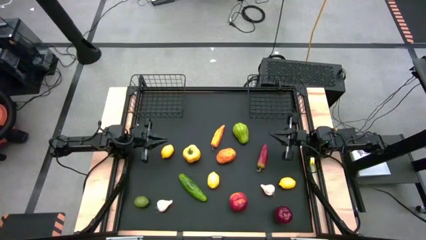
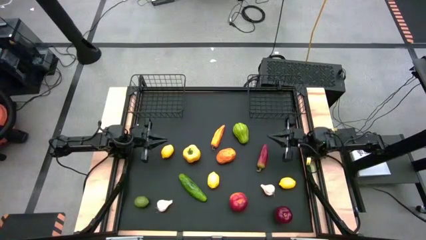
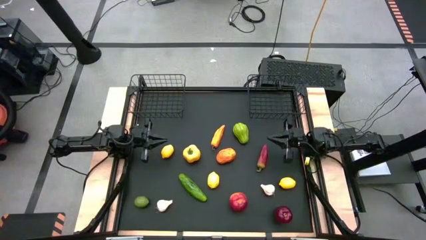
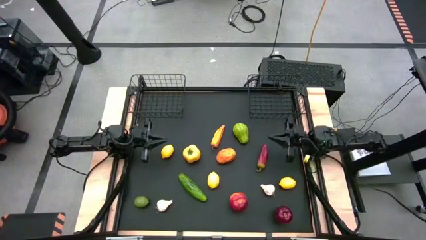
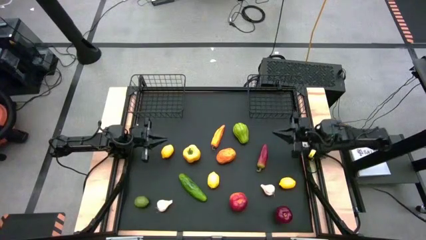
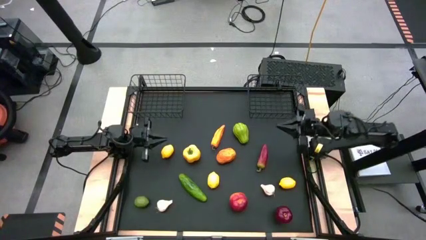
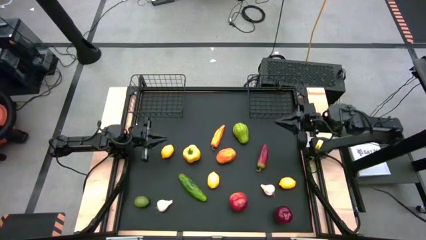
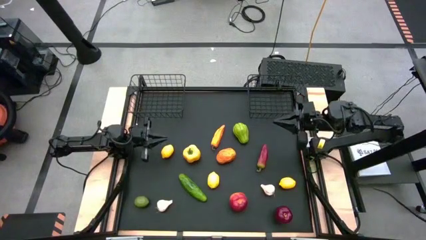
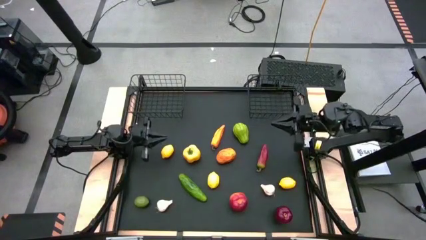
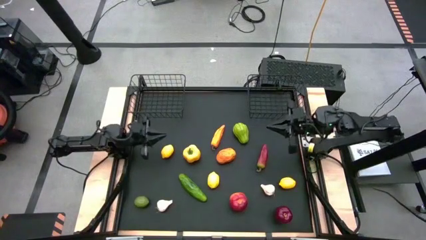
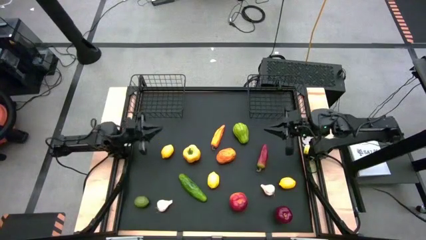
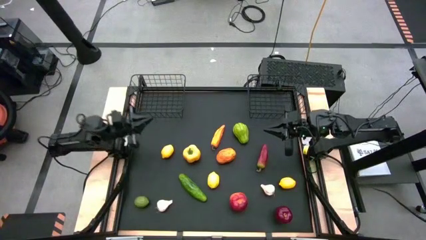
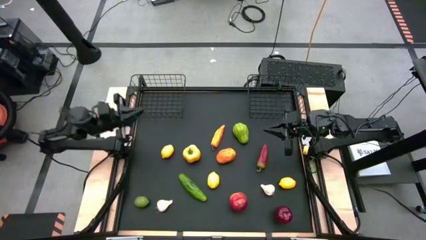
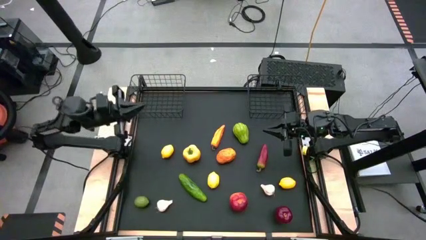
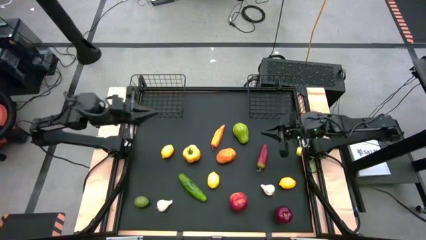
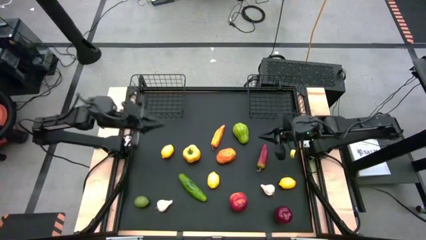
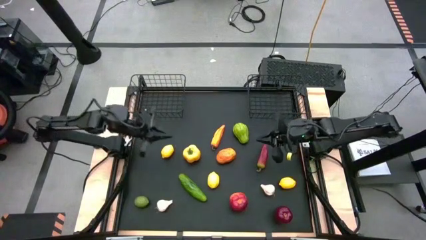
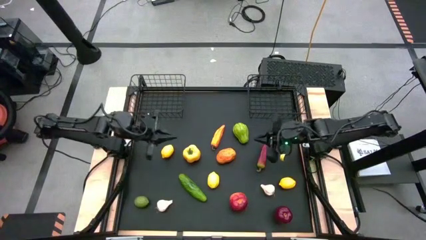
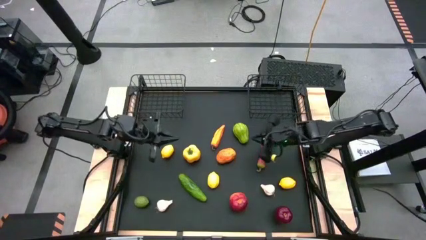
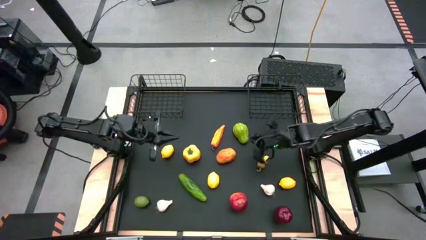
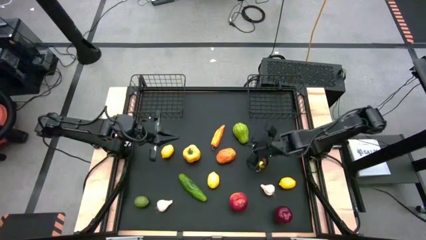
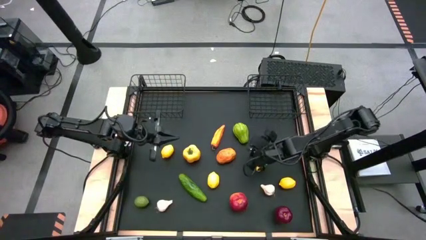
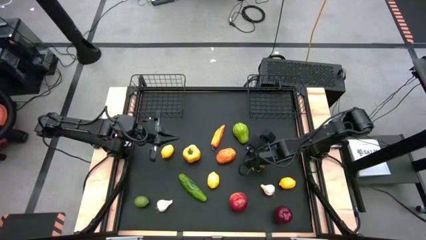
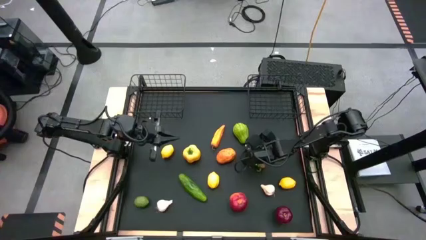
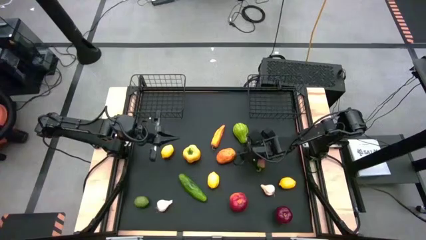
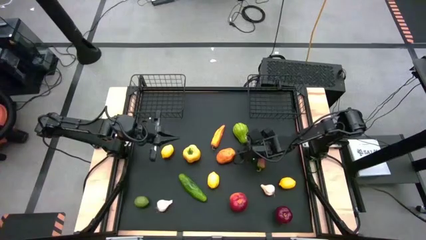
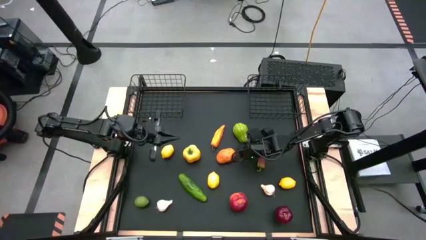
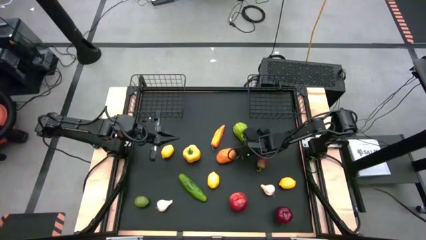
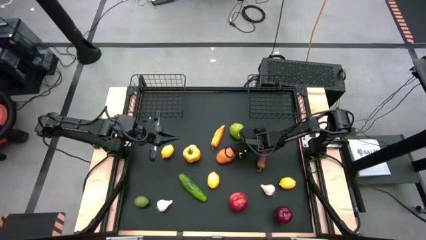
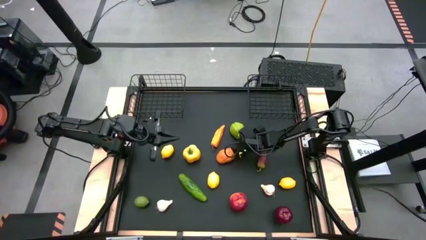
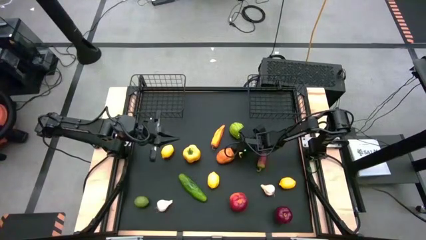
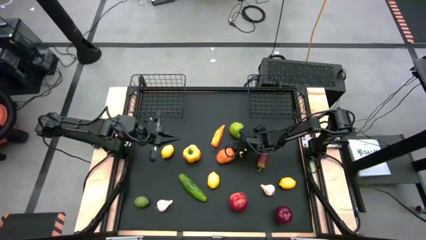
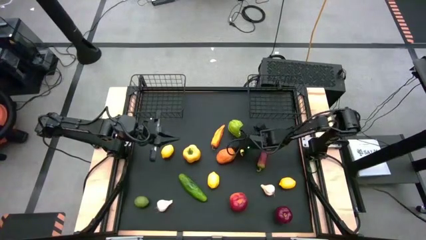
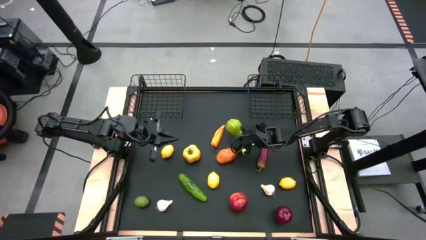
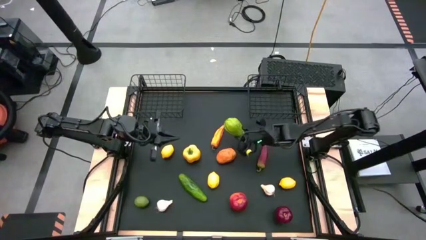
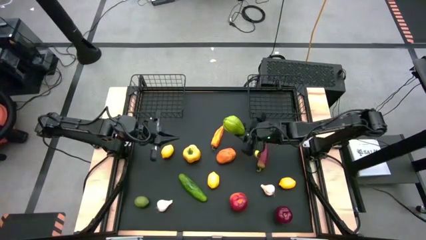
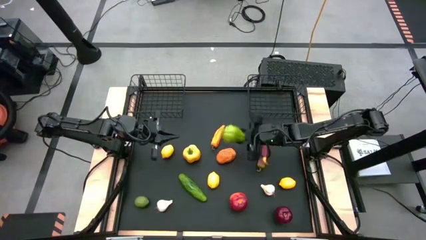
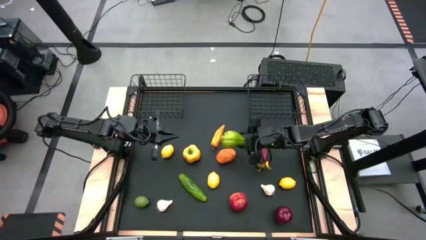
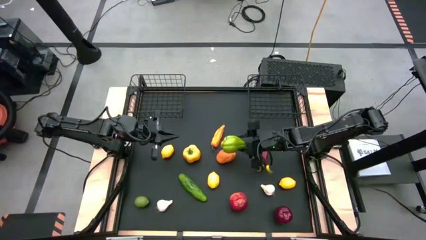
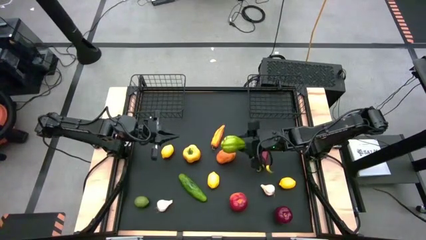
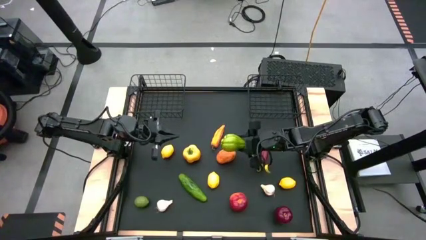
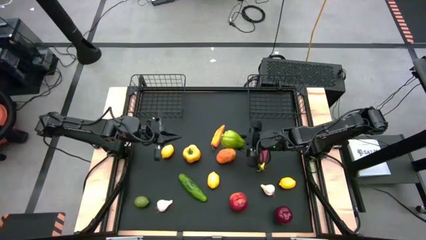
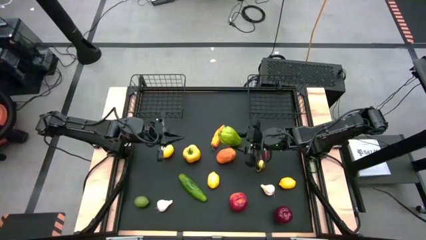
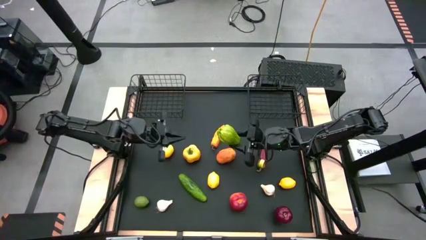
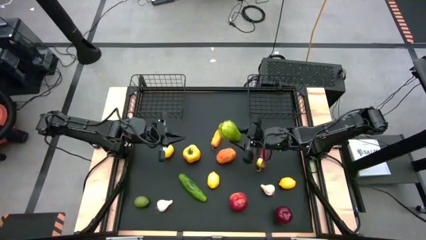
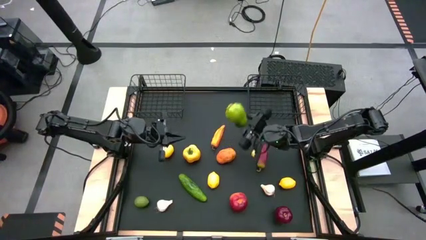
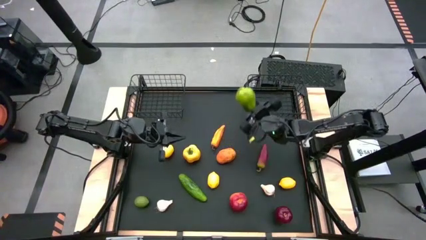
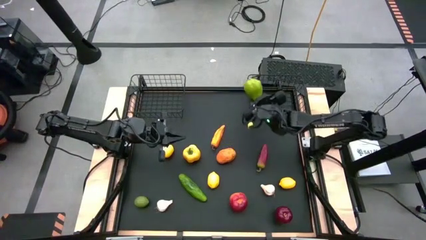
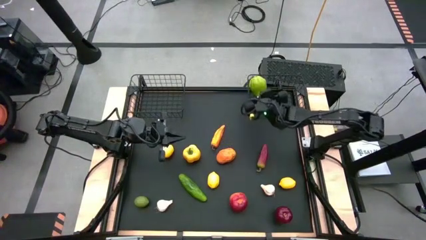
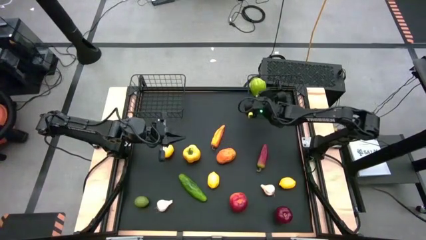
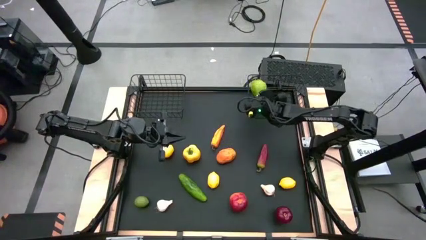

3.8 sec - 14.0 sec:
Task: Sort produce into baskets
Put the green chayote into the right black wire basket

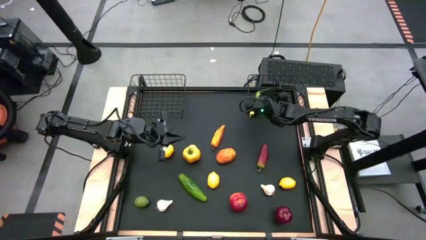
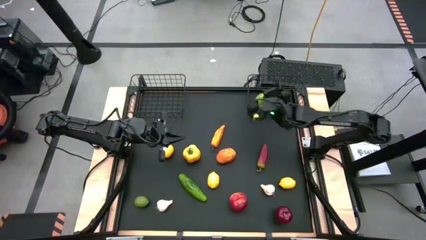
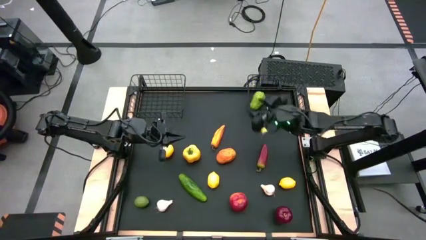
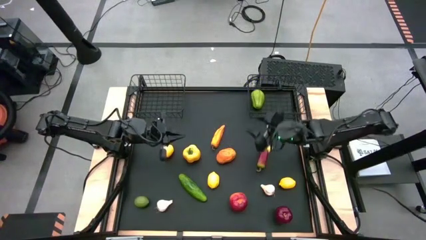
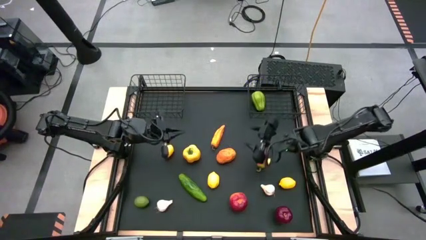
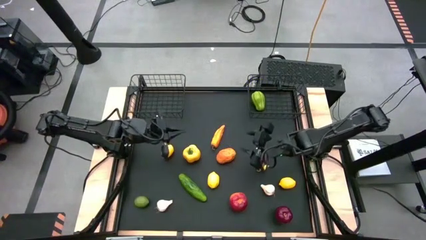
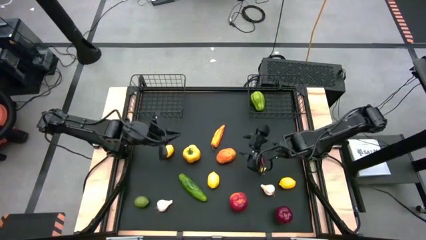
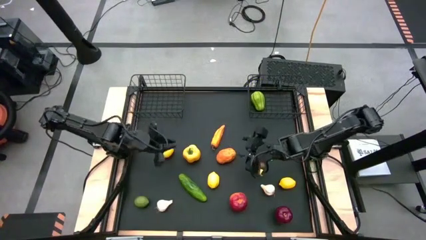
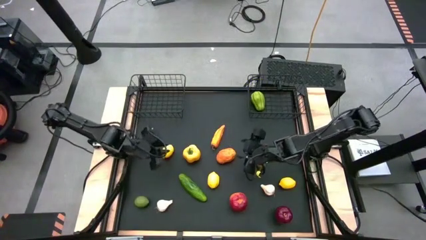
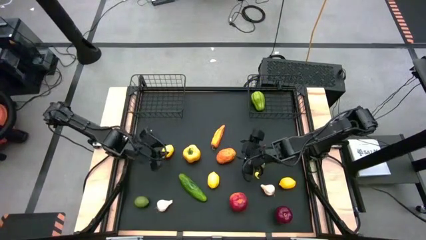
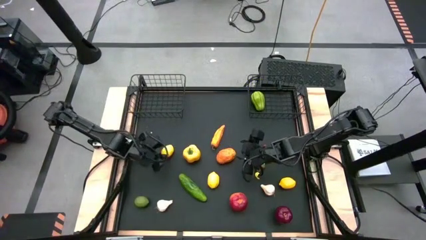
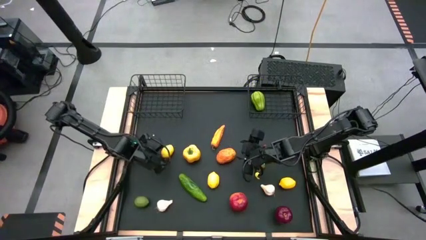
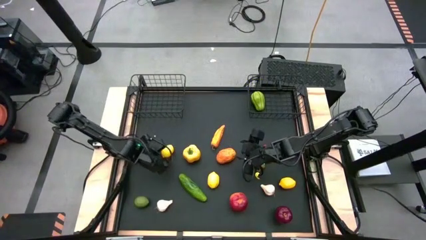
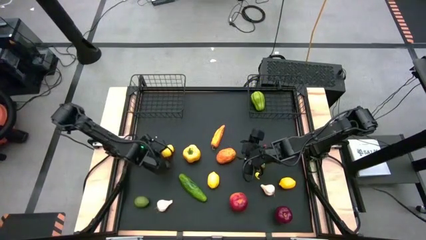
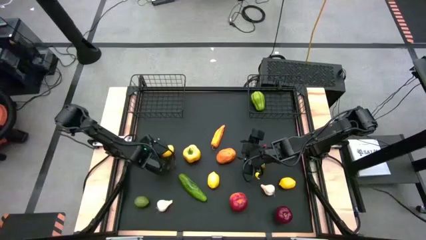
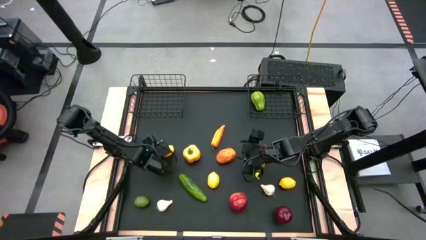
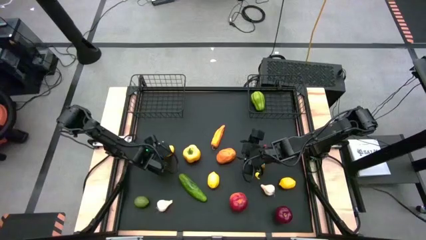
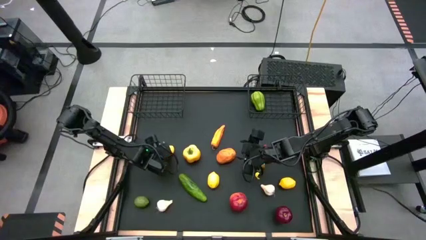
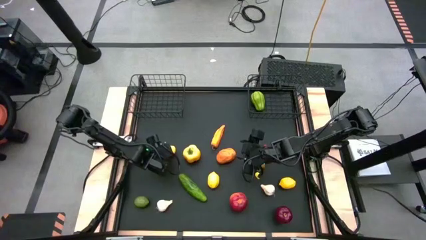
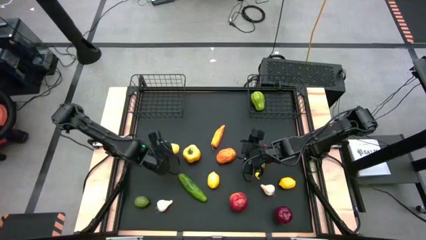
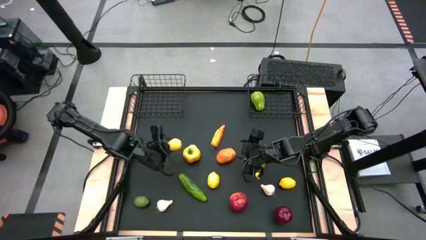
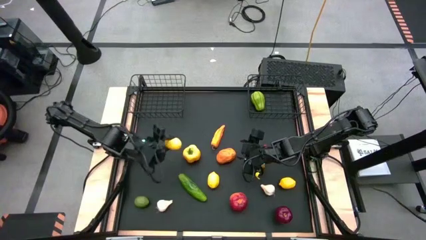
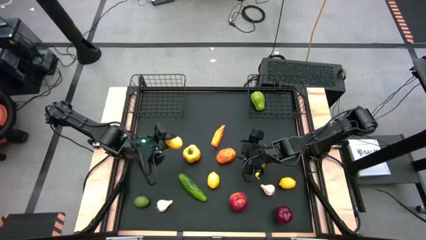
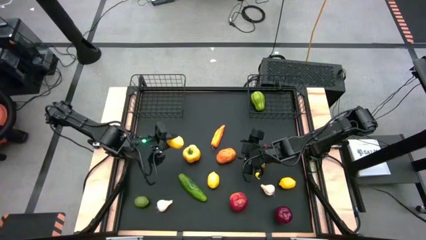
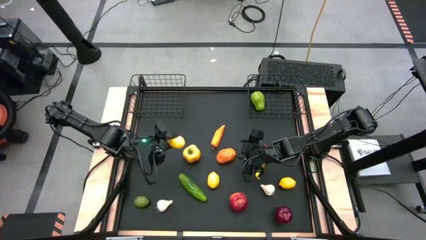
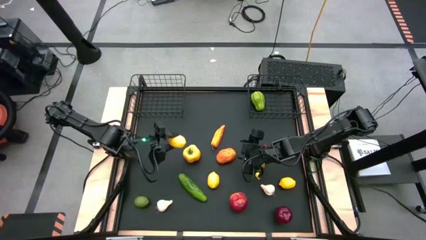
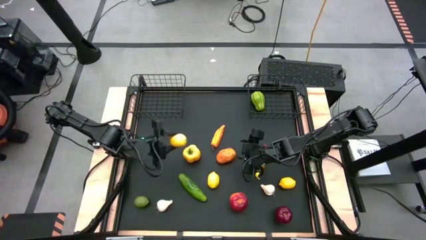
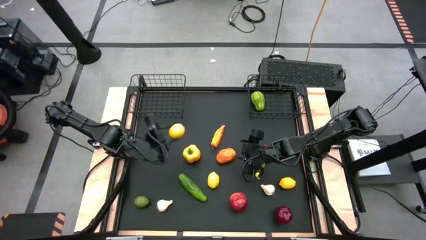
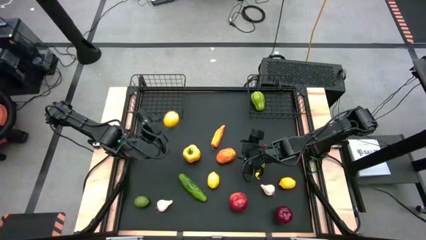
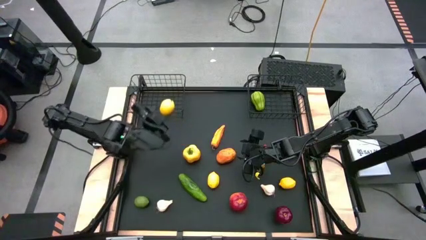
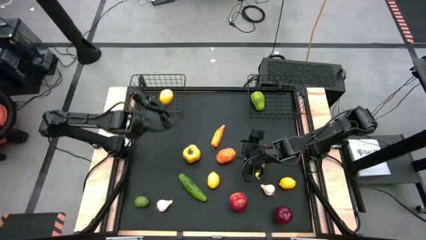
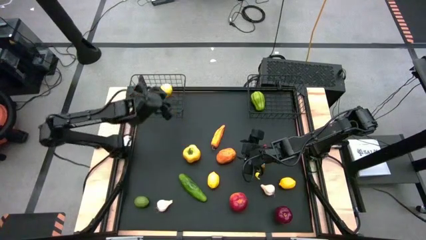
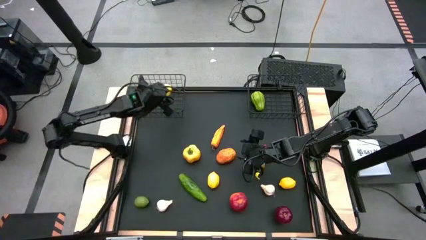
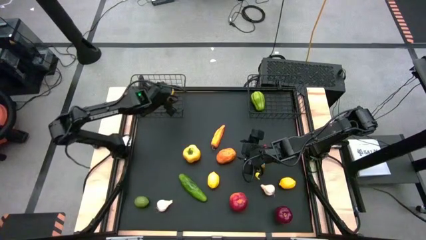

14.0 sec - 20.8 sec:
Put the top yellow lemon into the left black wire basket
